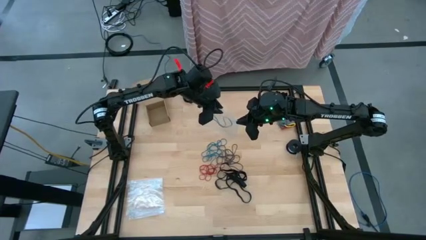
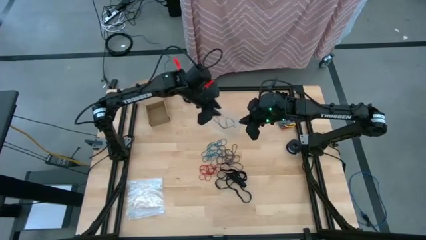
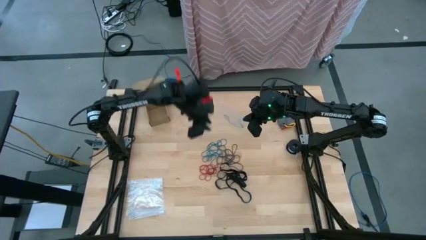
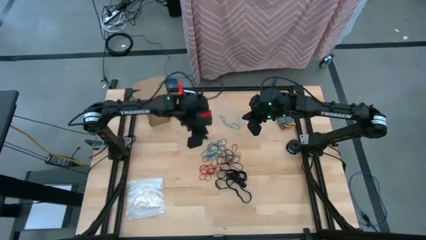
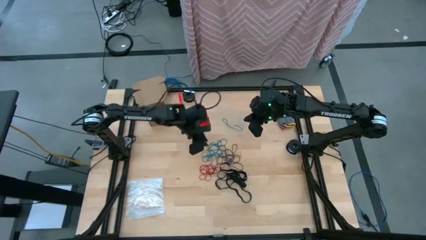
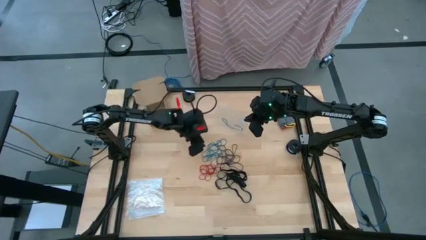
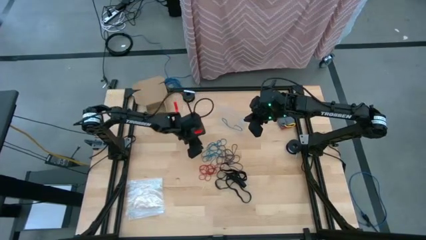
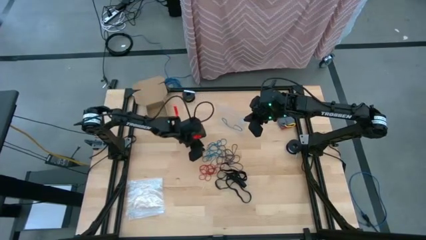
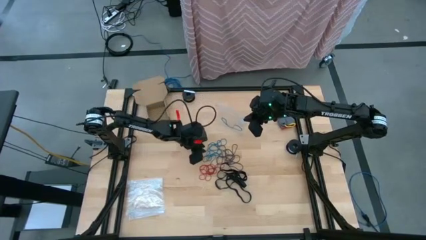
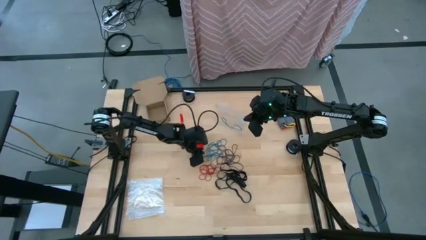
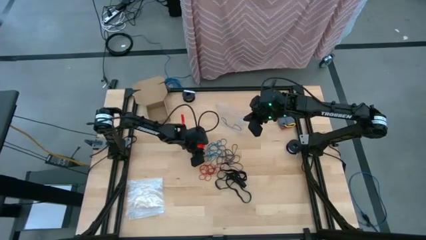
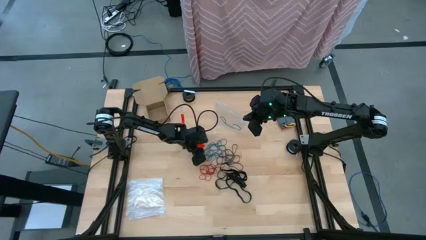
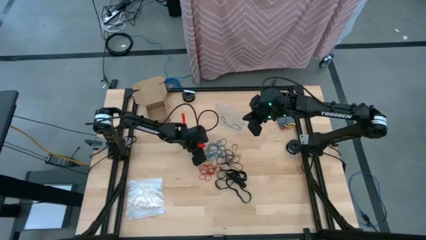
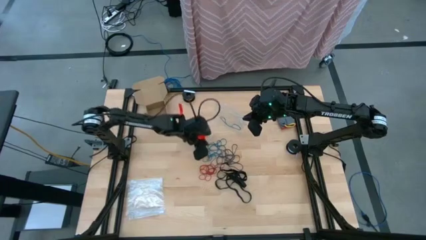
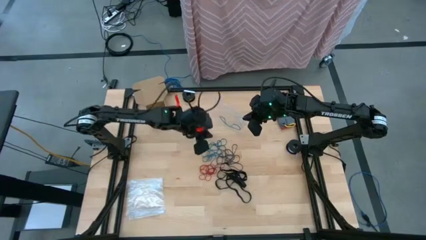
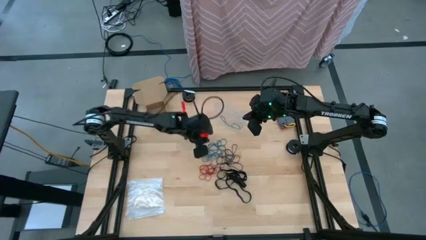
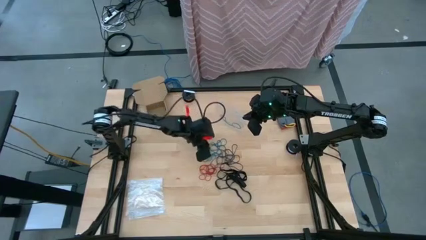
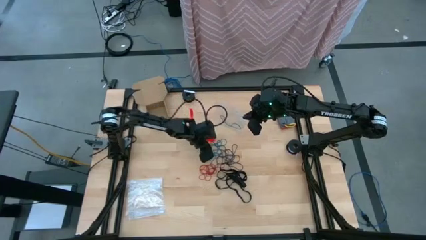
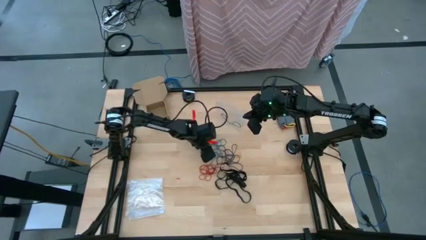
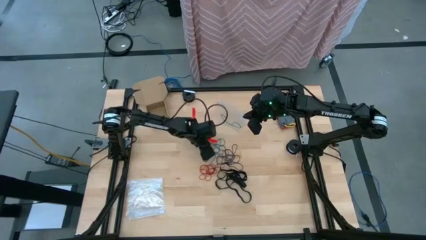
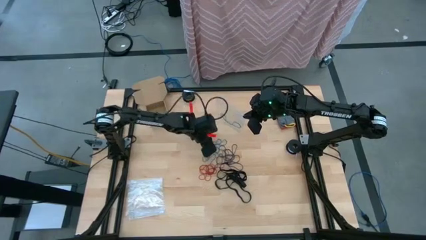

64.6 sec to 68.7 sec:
Task: Sort rubber bands
Put the blue rubber band into the transparent zip bag

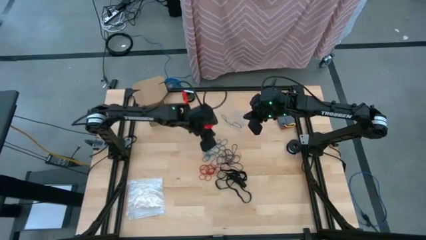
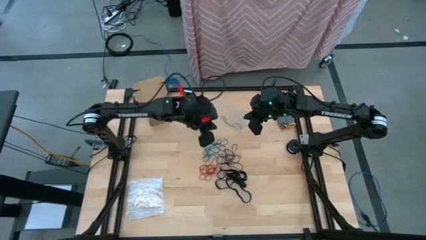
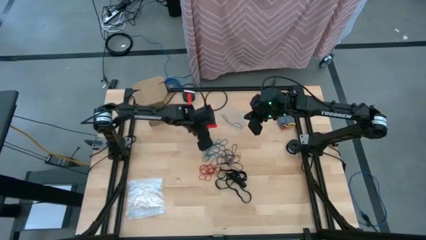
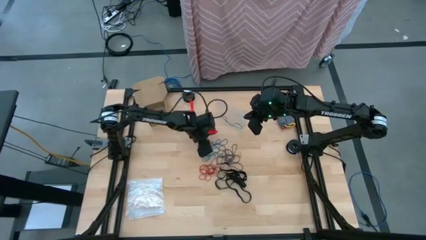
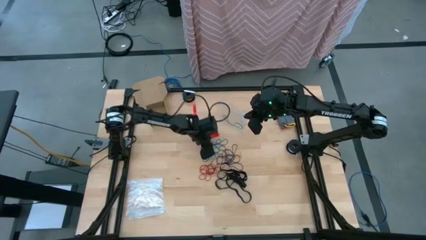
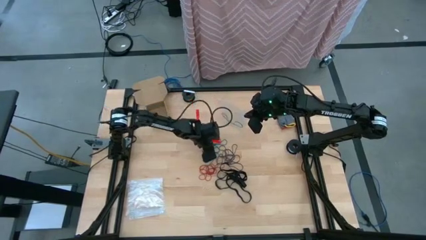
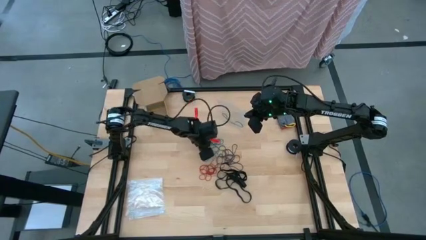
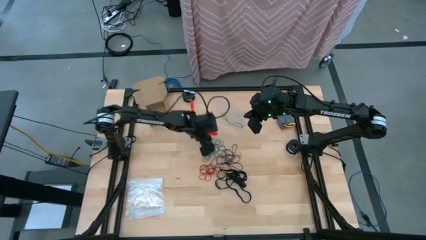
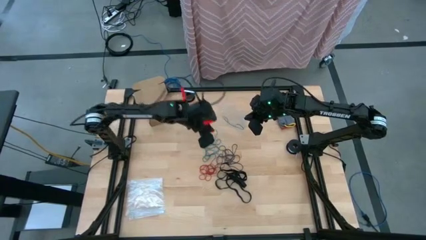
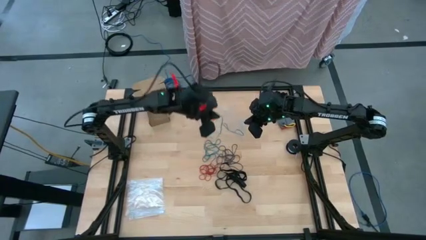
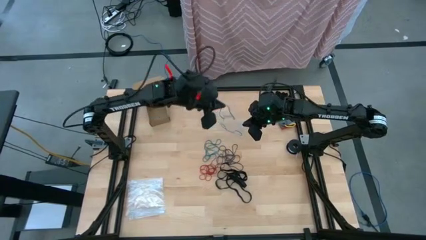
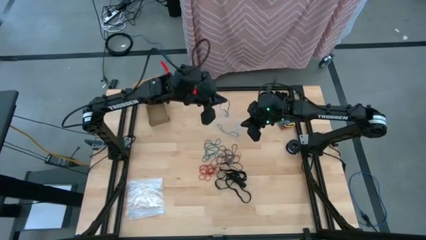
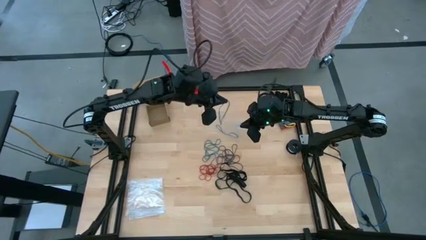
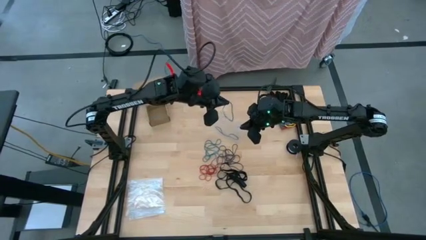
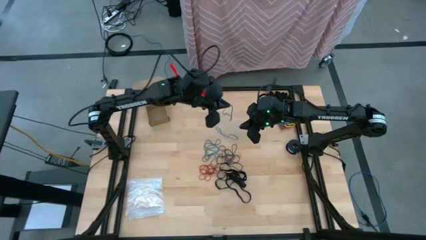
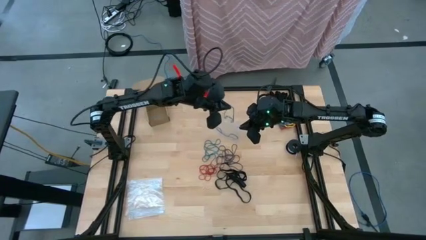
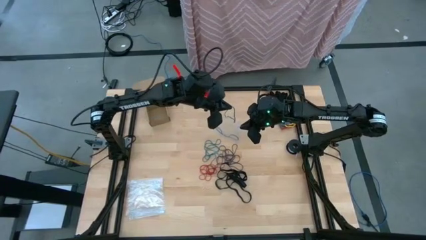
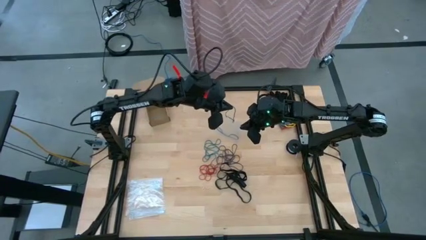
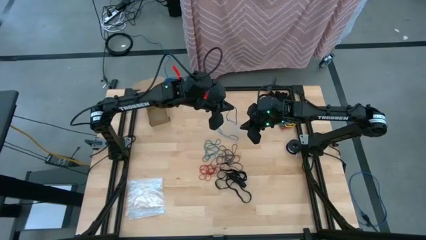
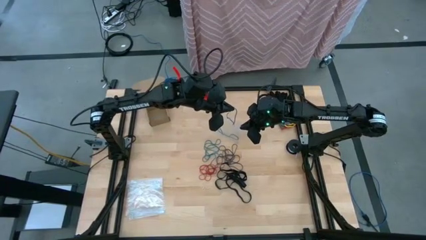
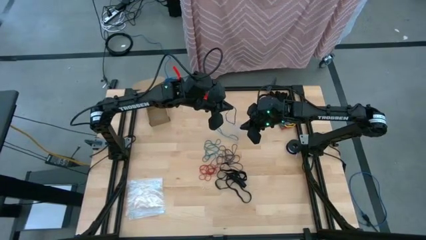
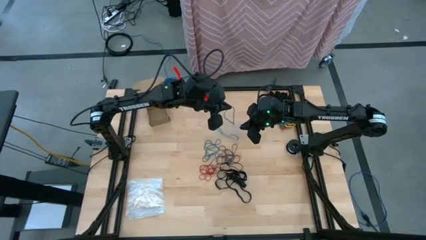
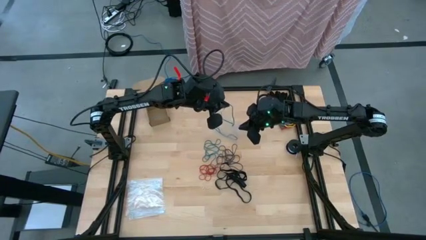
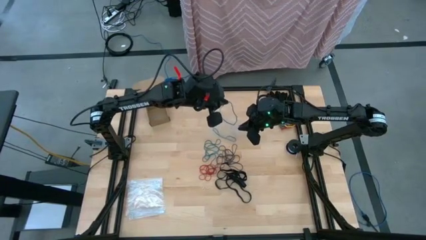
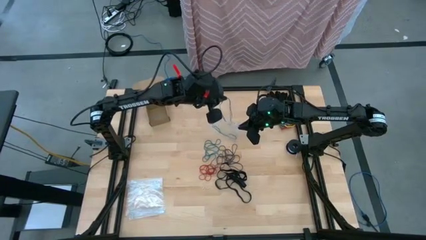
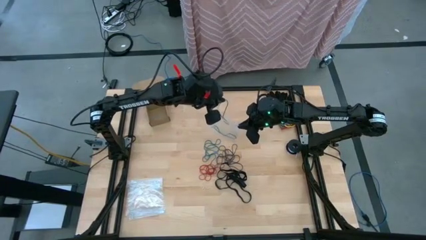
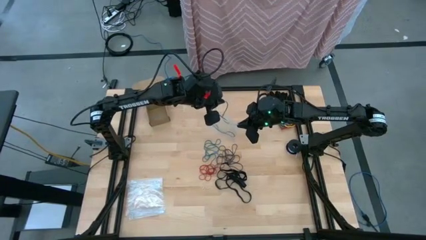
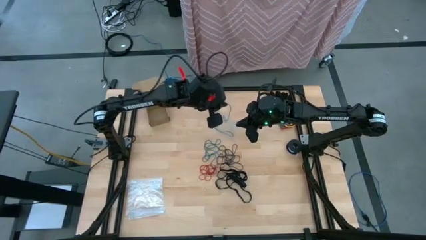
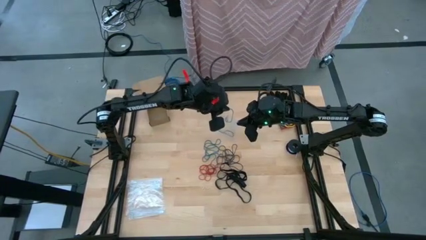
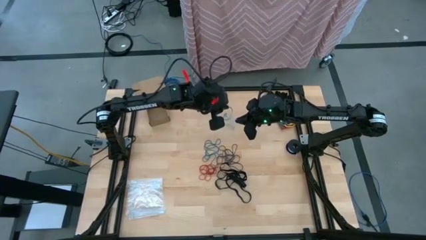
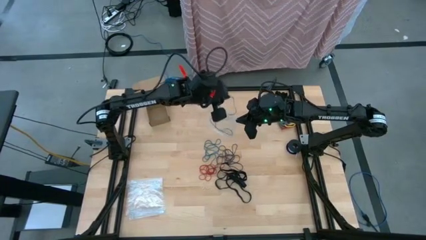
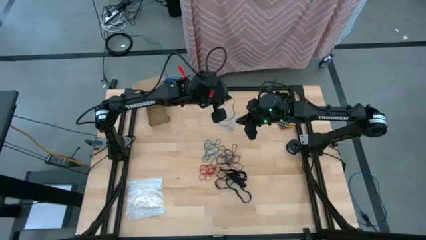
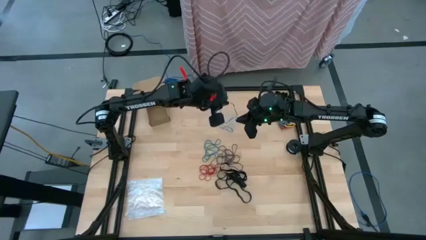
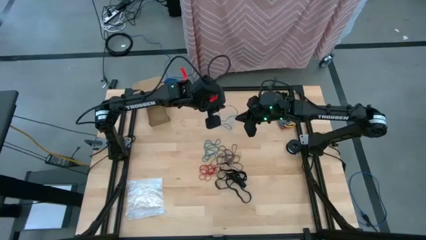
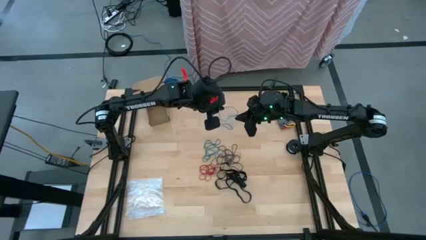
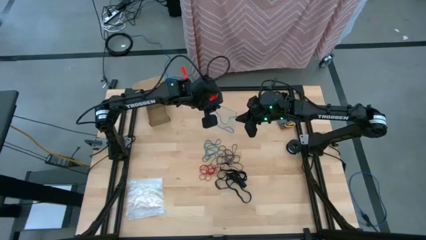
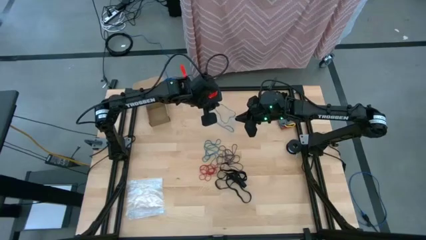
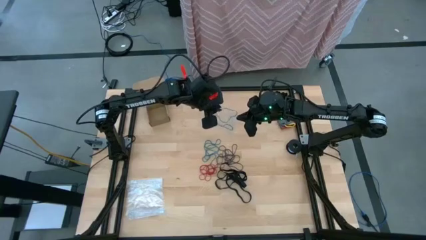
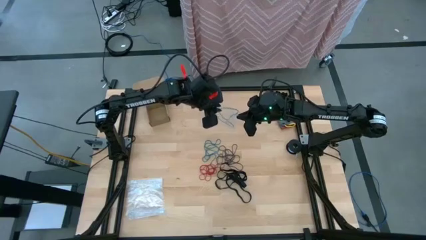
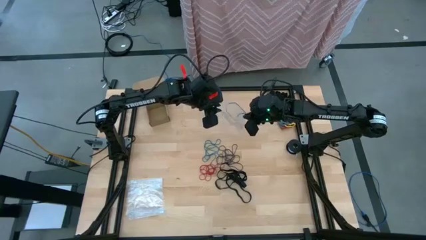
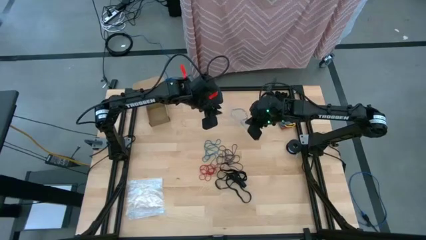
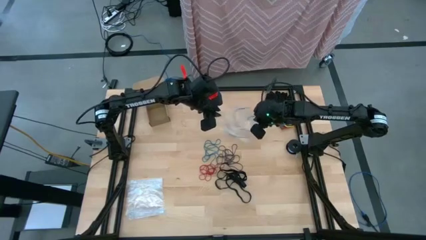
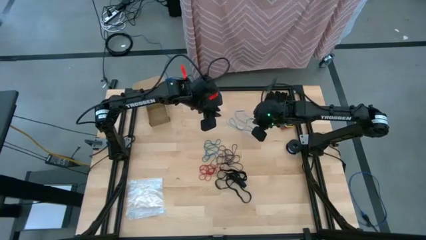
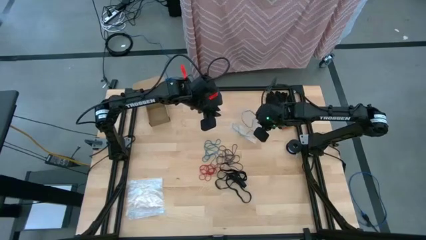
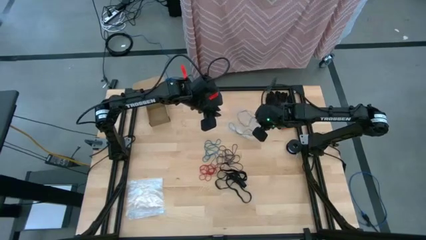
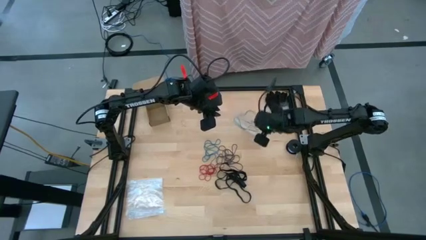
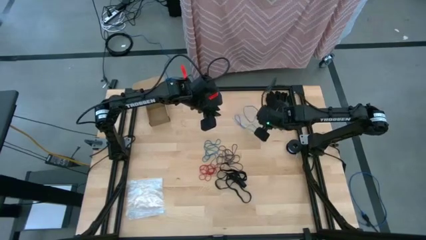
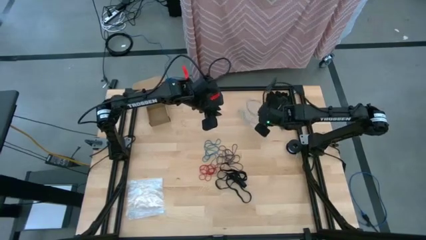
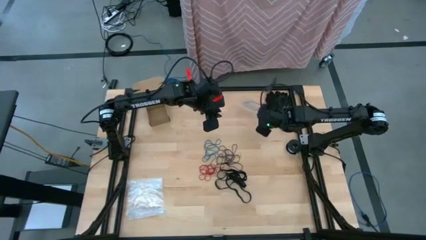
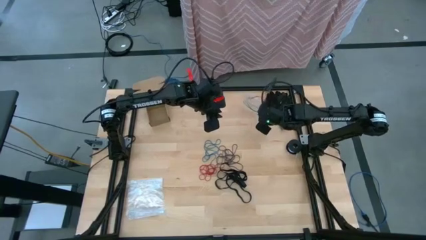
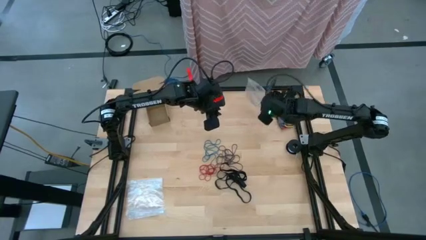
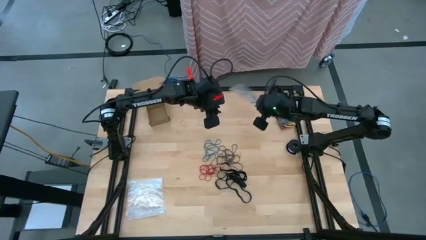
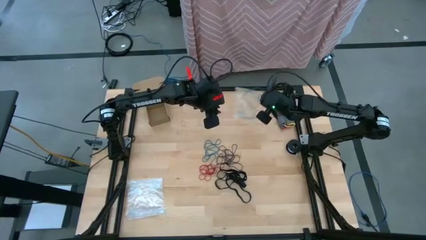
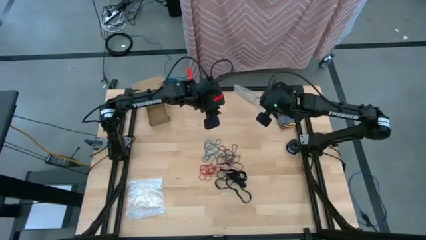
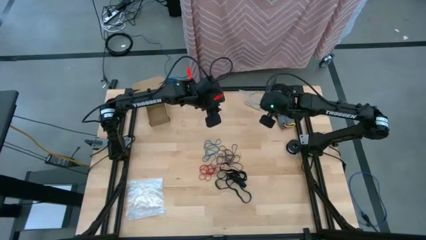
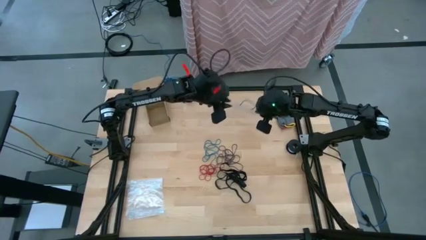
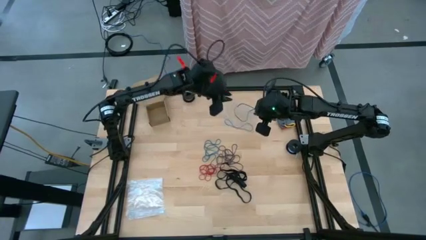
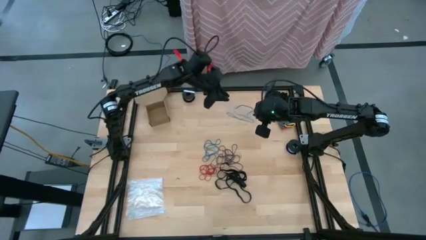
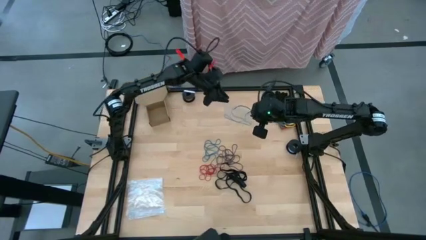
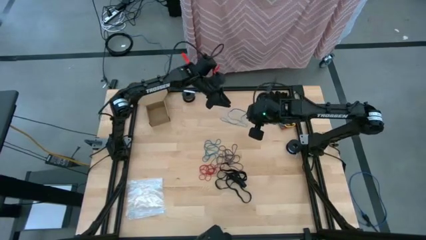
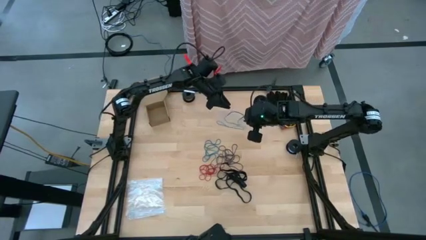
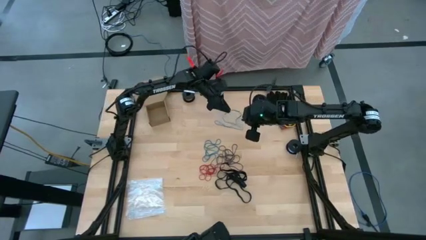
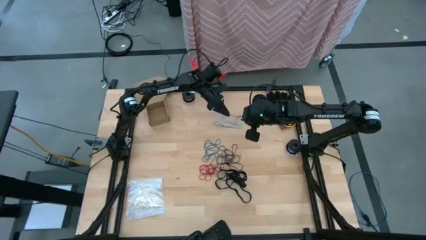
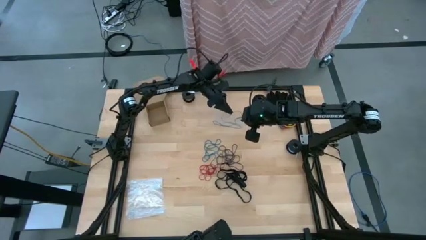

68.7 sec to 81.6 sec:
Put the blue rubber band into the transparent zip bag
